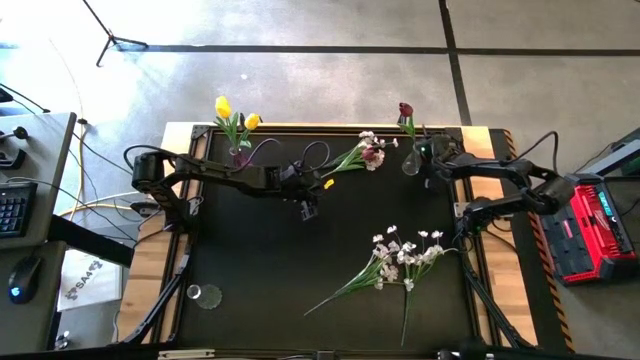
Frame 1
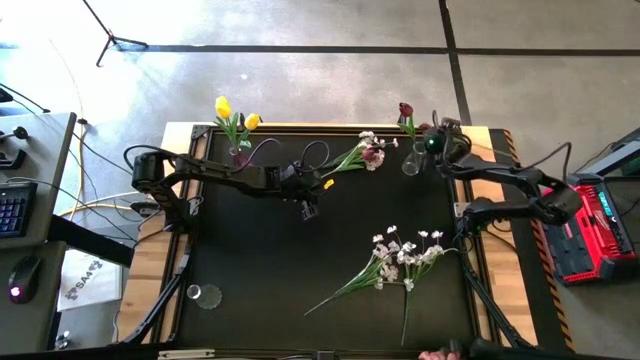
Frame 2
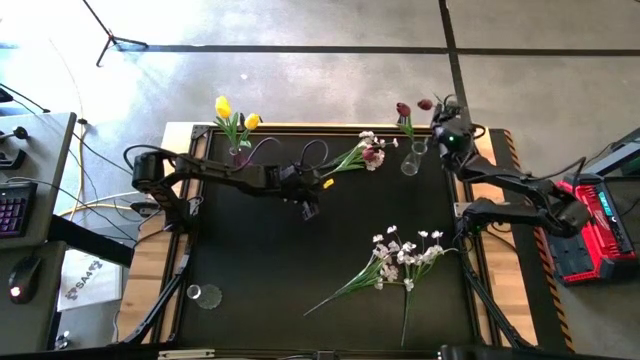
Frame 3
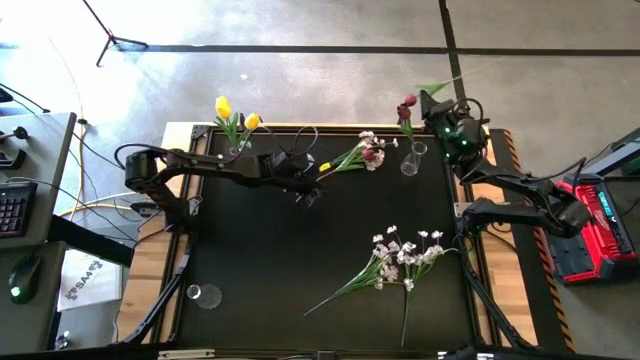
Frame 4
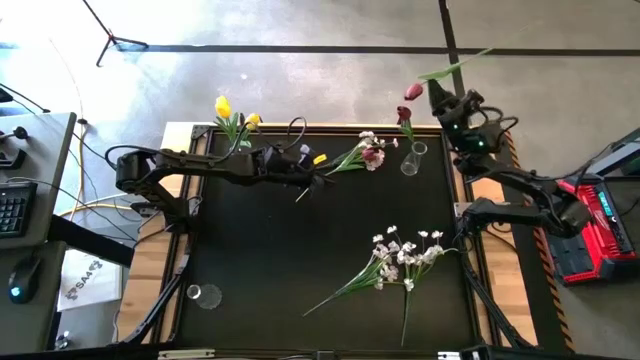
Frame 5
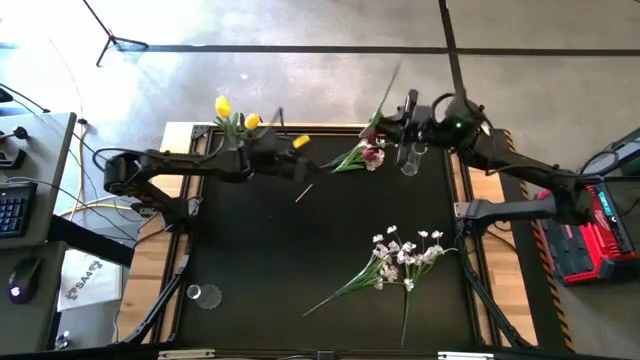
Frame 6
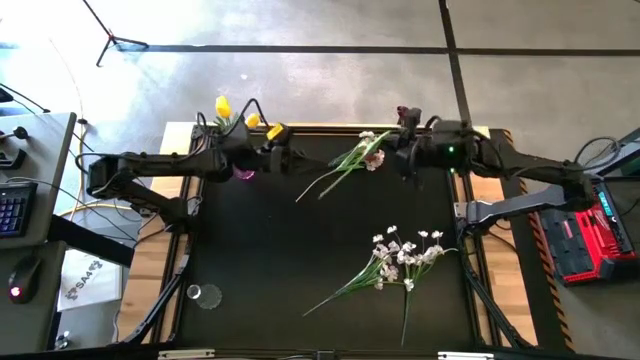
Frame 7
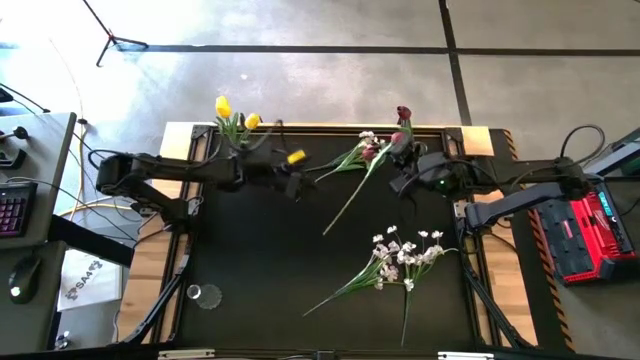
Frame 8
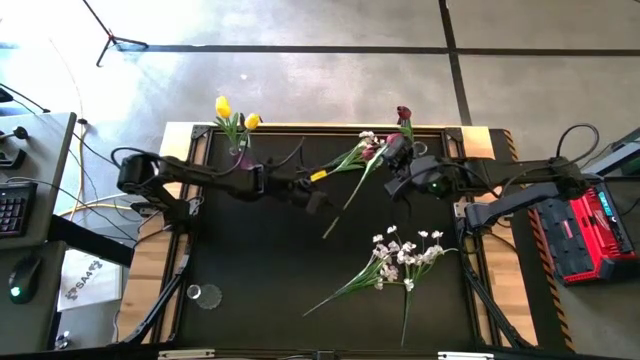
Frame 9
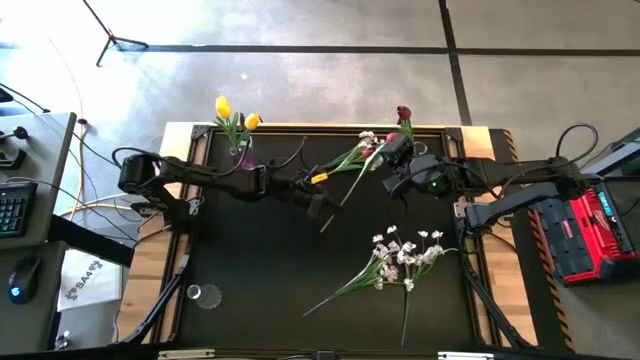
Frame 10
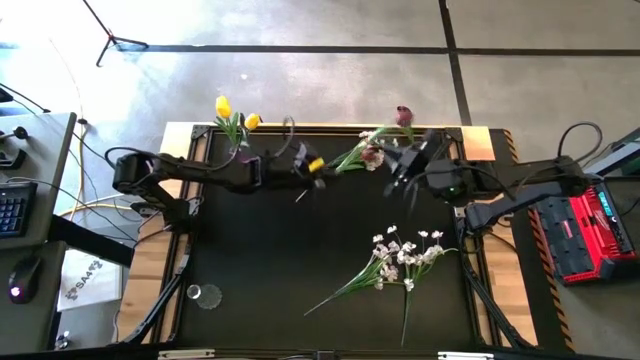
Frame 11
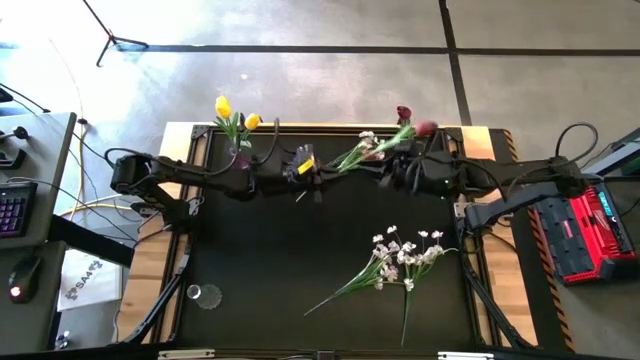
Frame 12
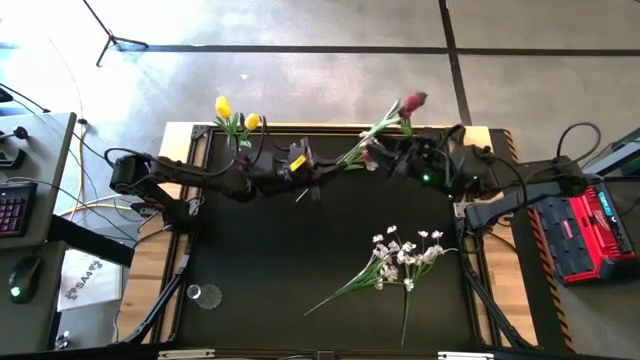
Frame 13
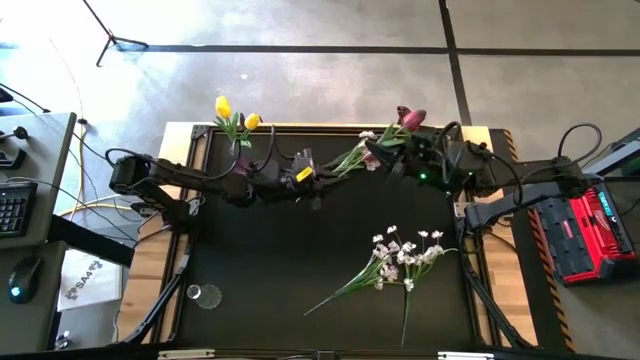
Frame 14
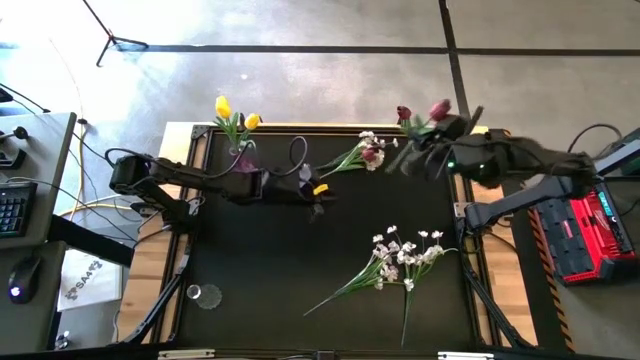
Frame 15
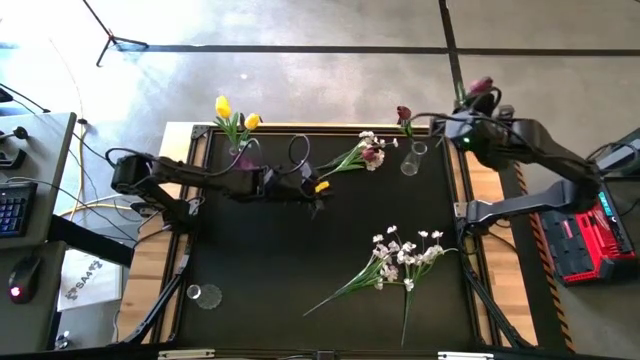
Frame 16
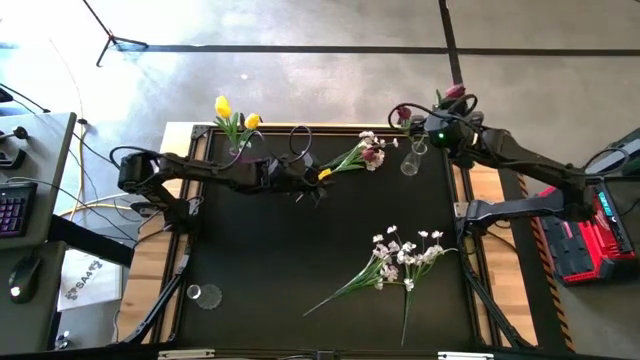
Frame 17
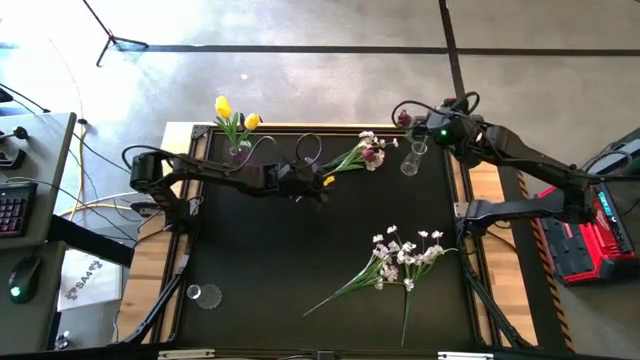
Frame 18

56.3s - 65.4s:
Task: Sort flowers into vase by color
Put the bottom red flower into the top transparent vase

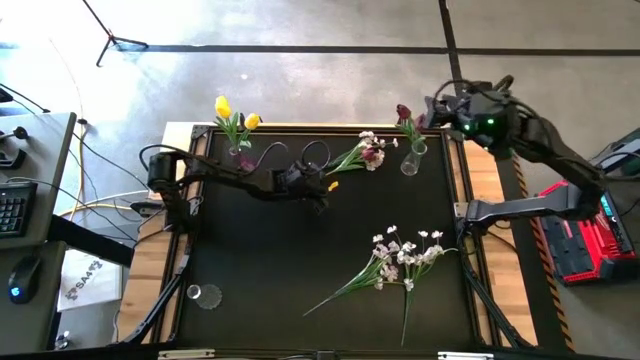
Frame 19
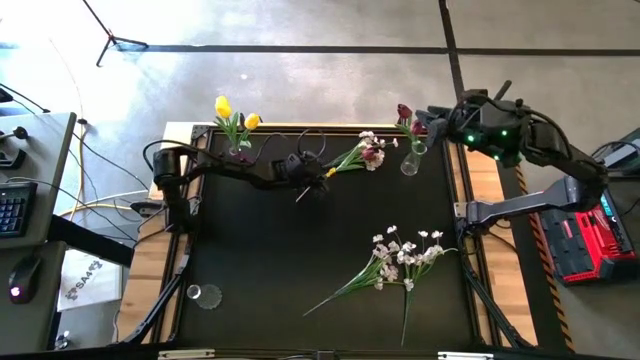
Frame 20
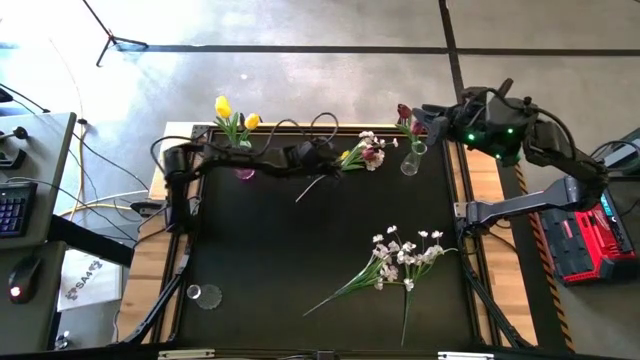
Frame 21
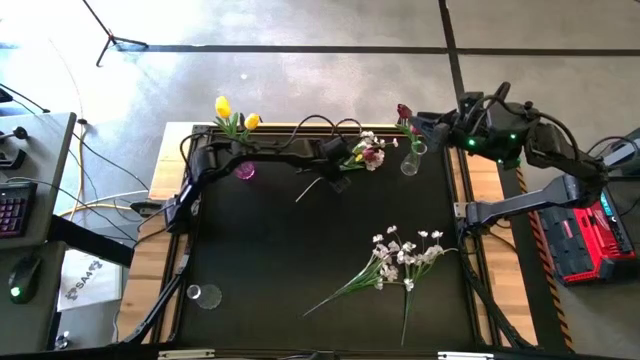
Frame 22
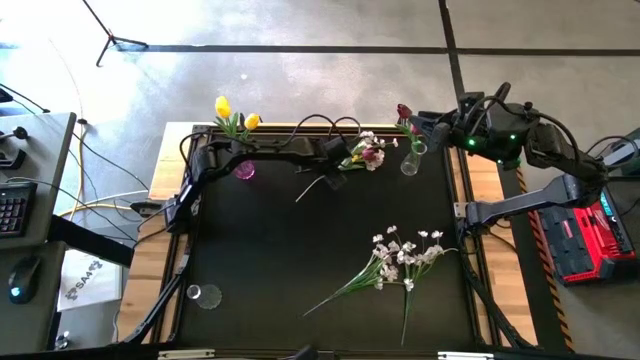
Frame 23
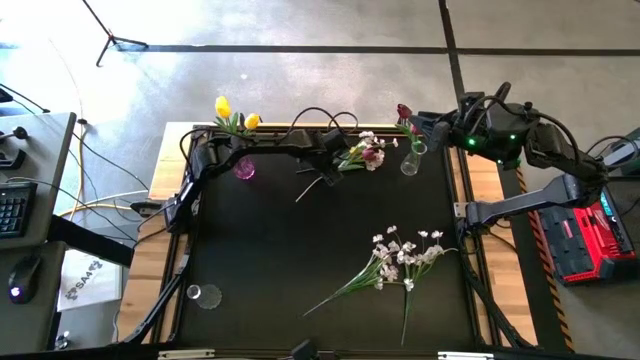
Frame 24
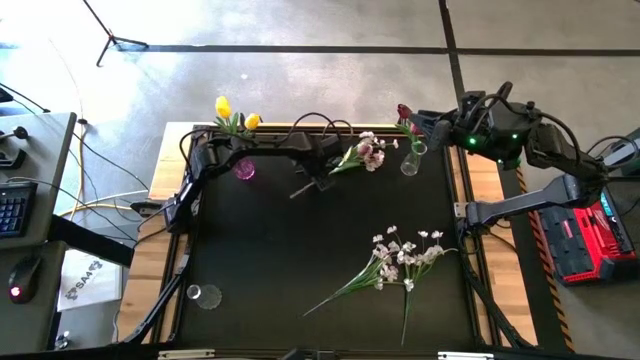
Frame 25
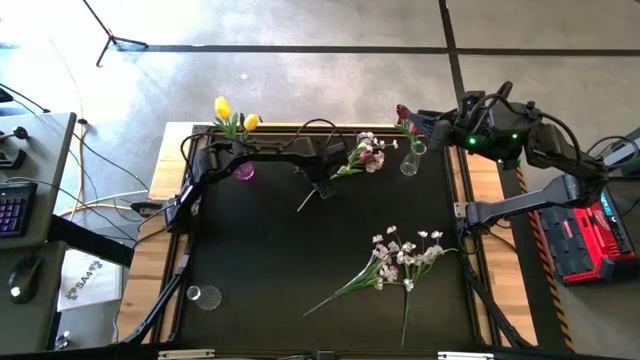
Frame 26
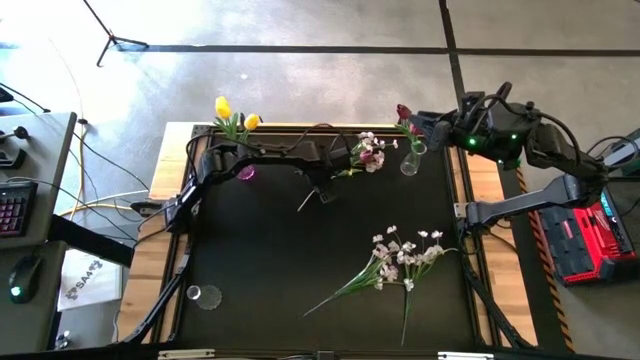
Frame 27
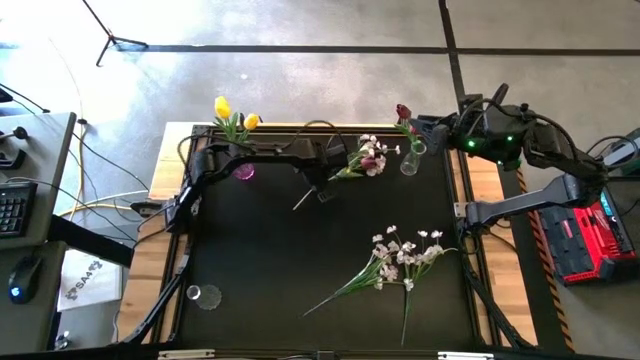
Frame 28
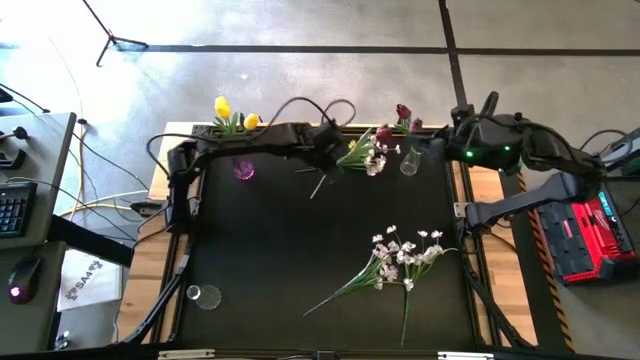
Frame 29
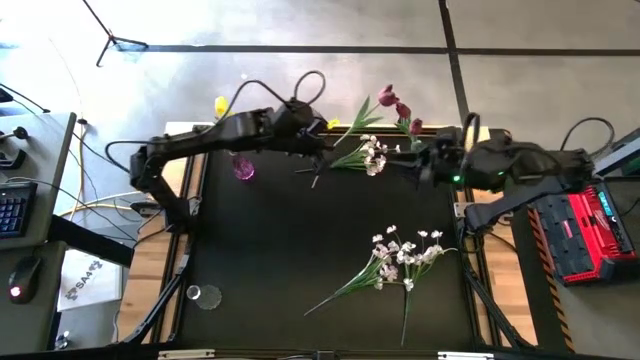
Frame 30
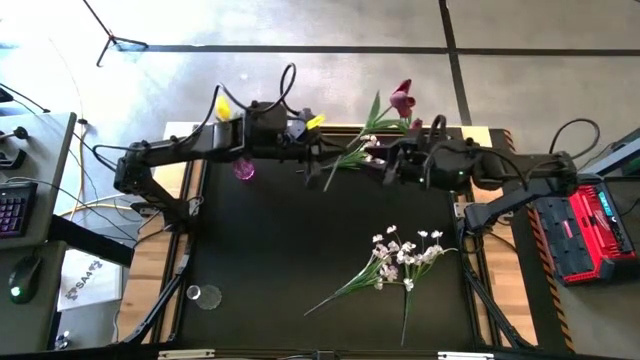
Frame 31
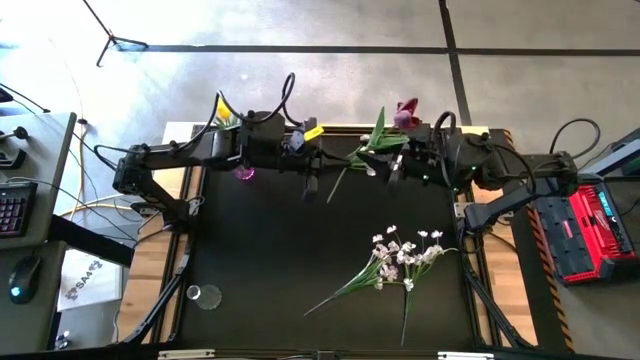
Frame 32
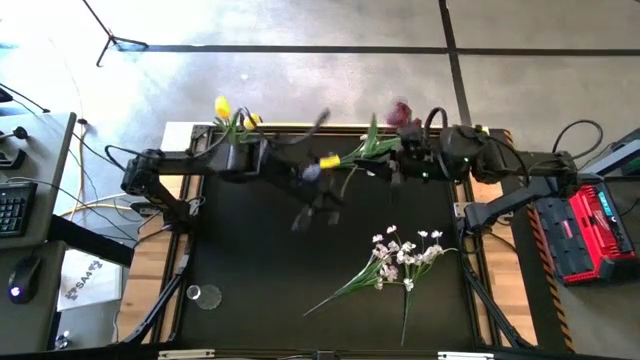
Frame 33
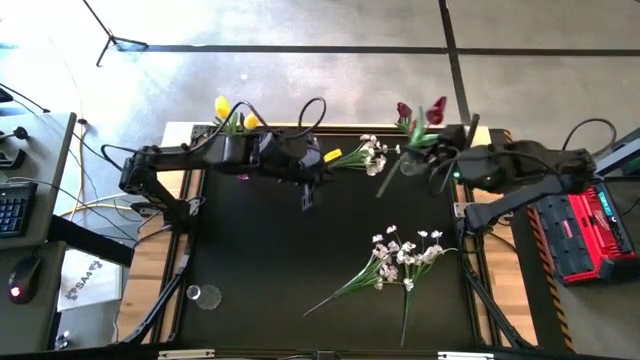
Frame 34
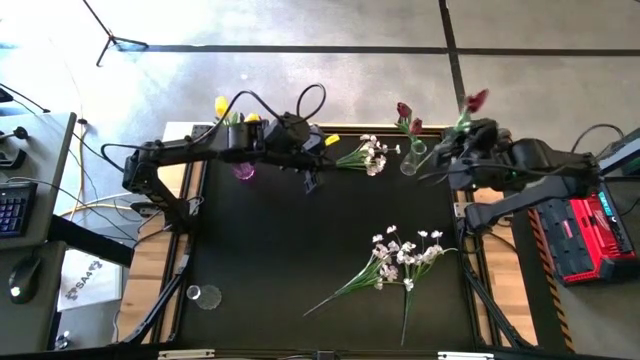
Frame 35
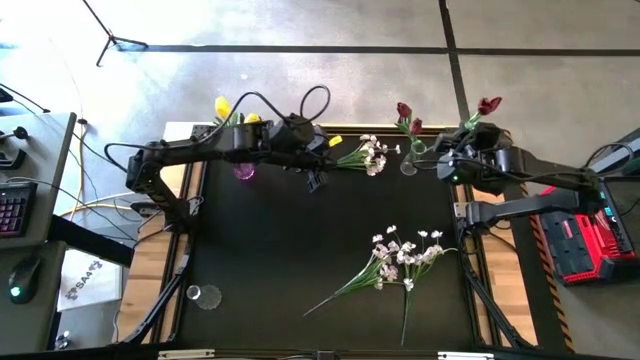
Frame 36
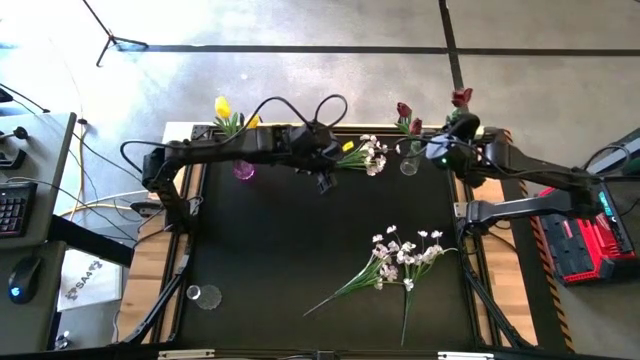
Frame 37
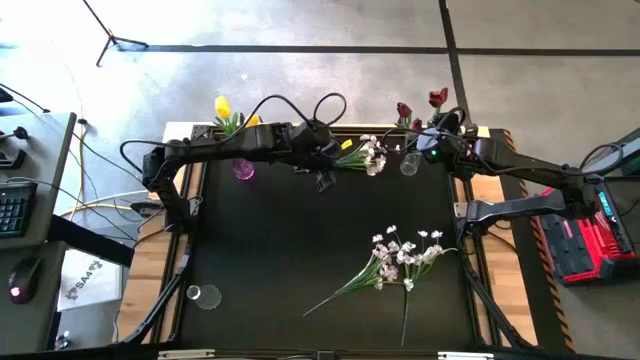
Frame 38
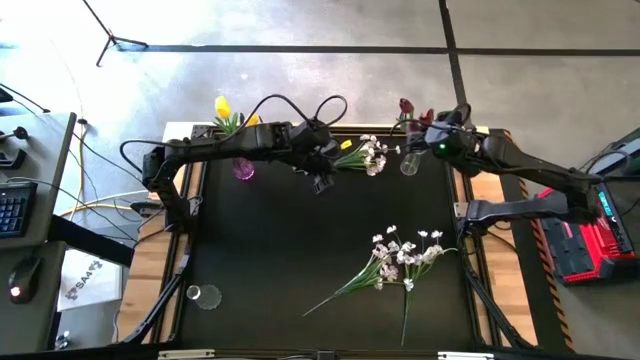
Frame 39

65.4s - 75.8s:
Put the red flower into the top transparent vase

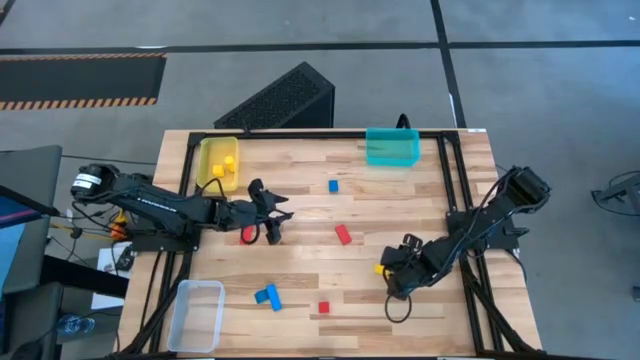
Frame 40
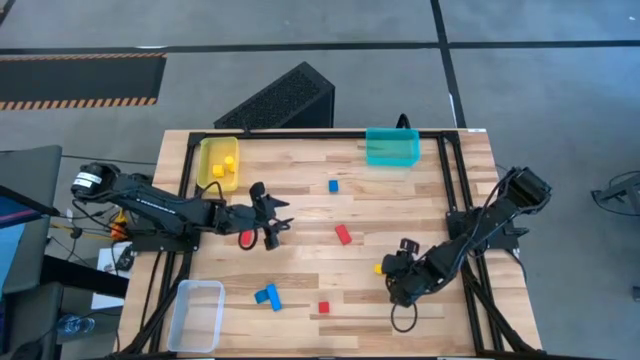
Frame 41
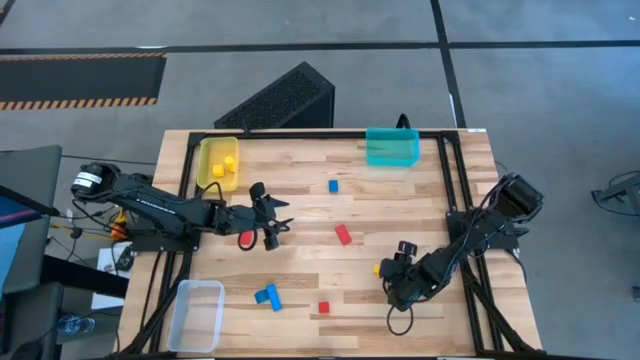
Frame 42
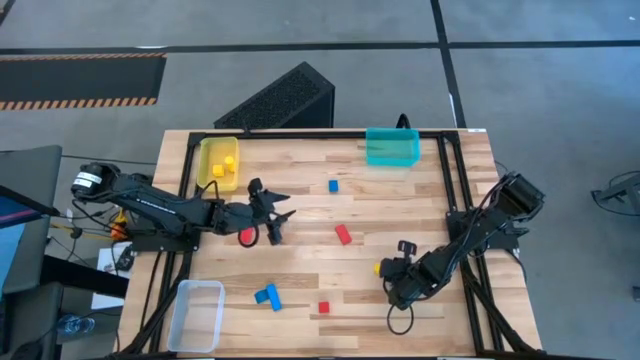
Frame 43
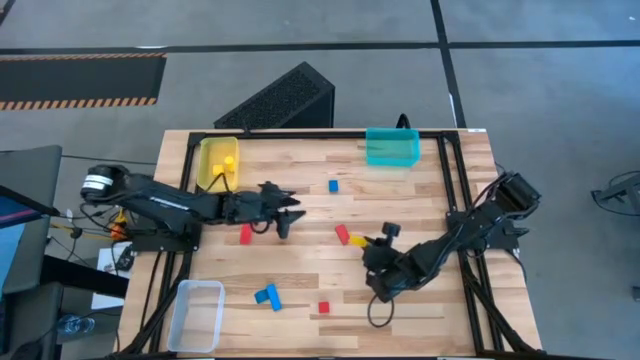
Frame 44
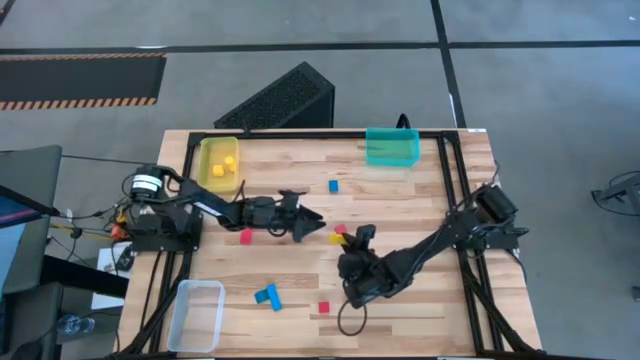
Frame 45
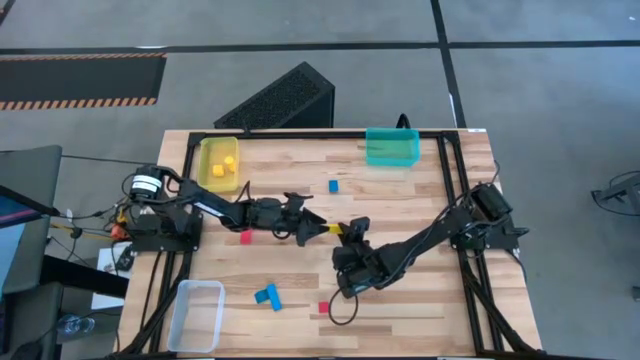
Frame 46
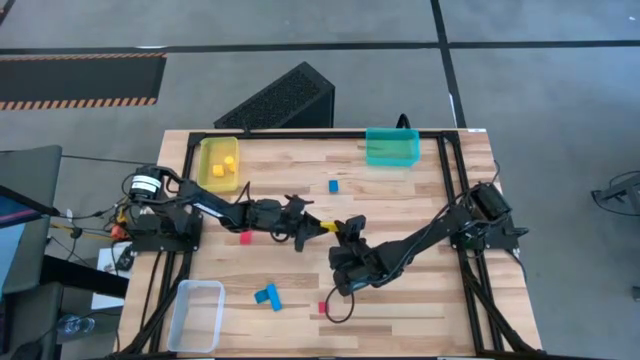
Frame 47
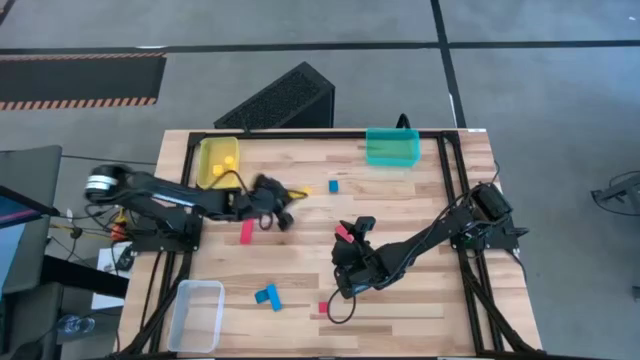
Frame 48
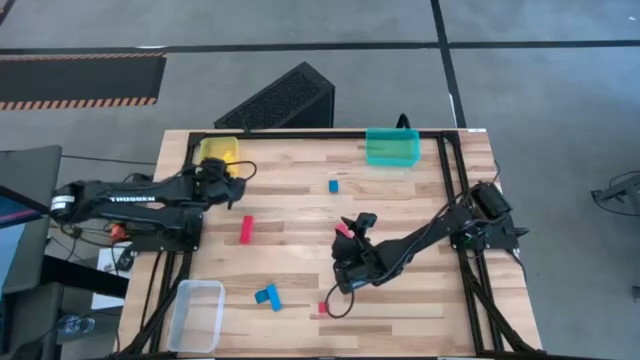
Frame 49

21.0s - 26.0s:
Task: Sort & place blocks by color
Put the yellow block into the yellow bin
